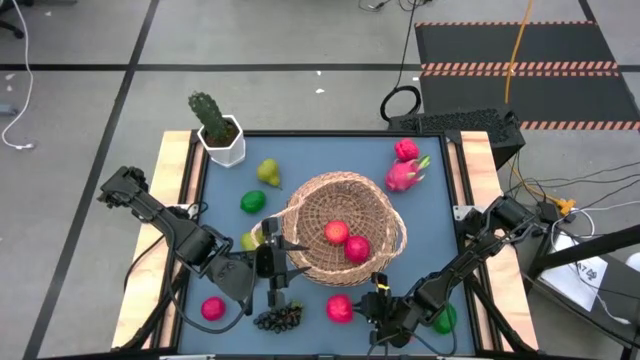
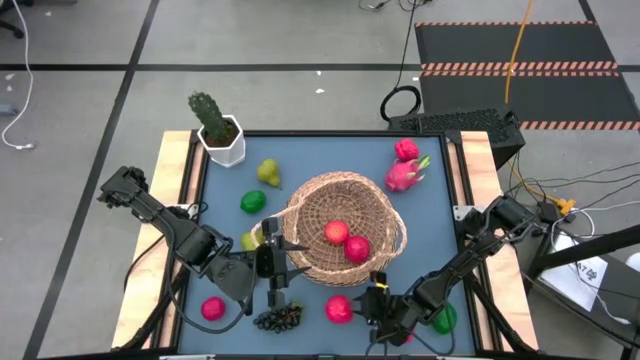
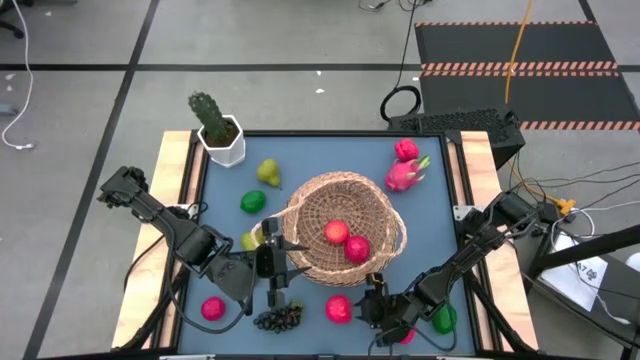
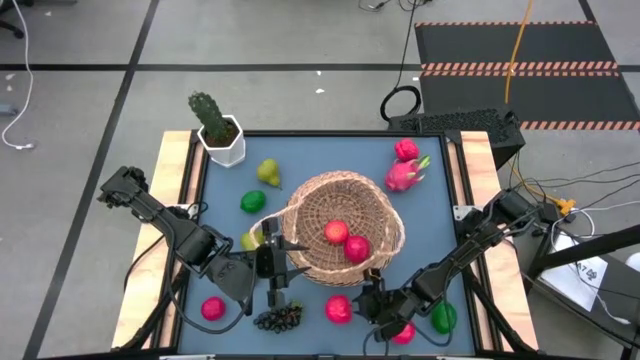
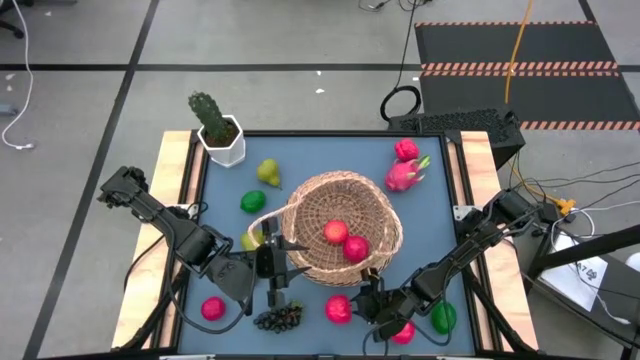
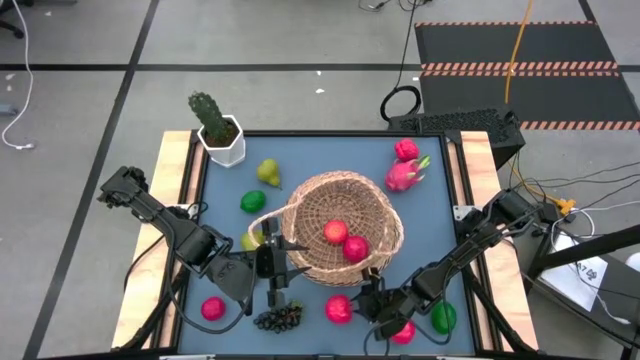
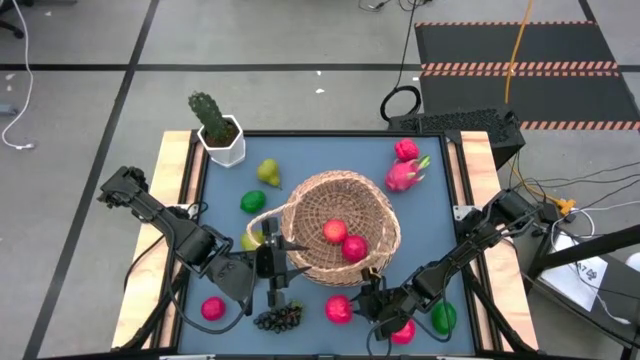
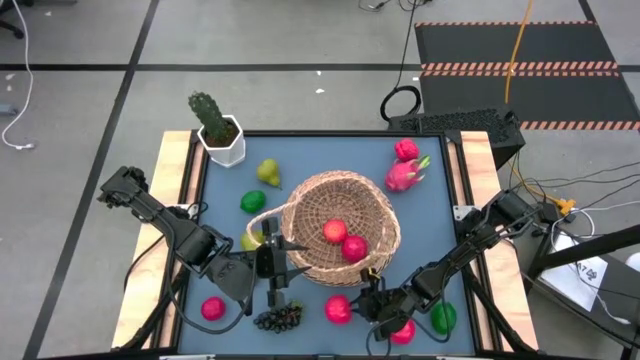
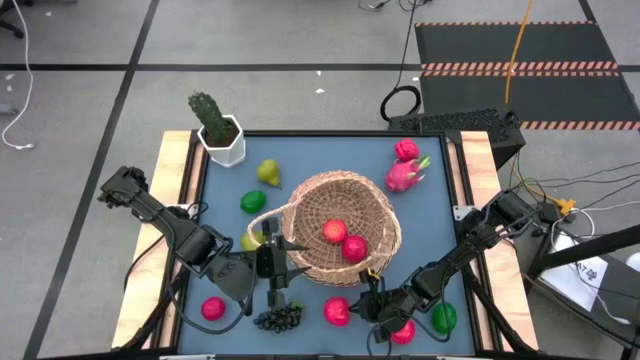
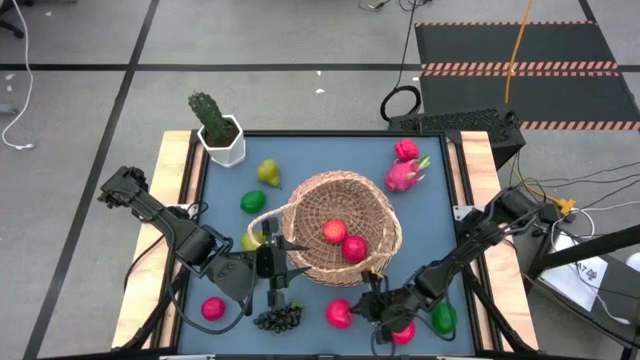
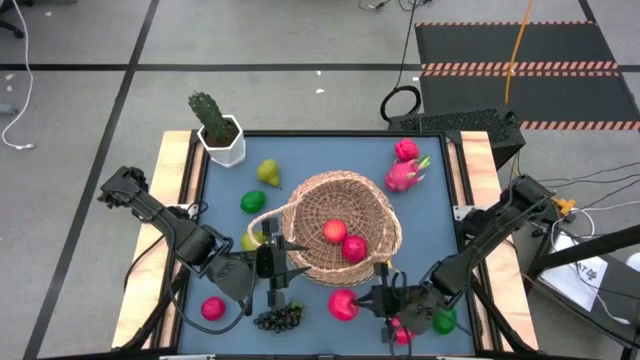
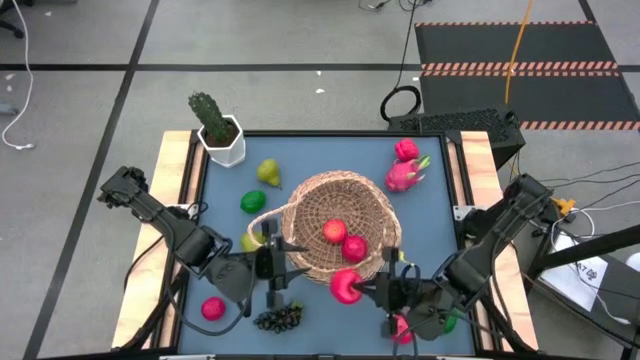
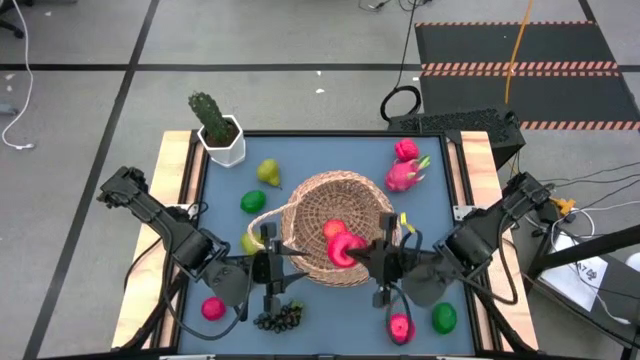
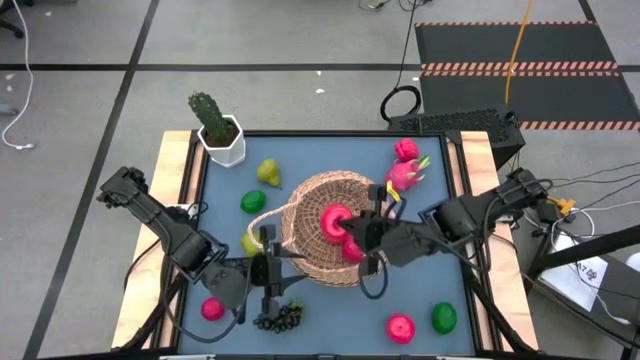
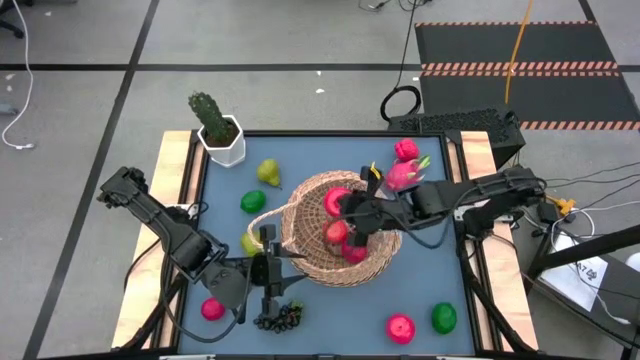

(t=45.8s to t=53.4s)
Task: Build produce basket
Put the middle red apple into the brown basket

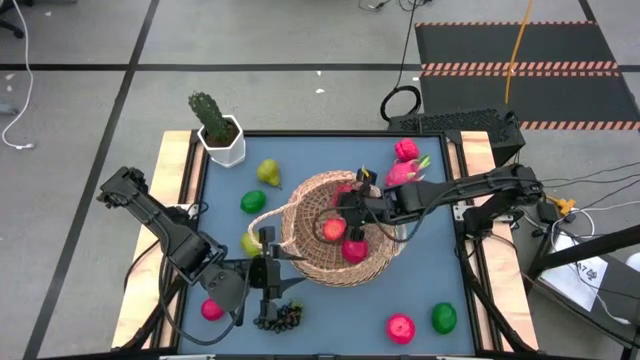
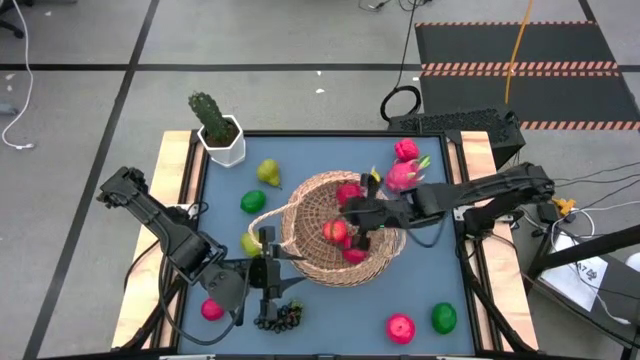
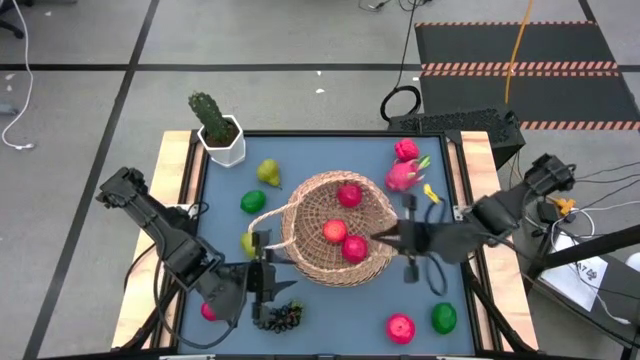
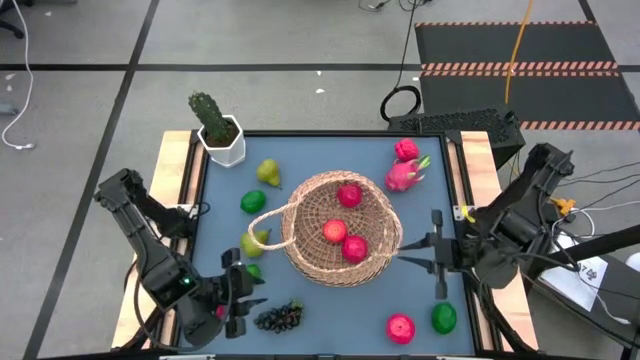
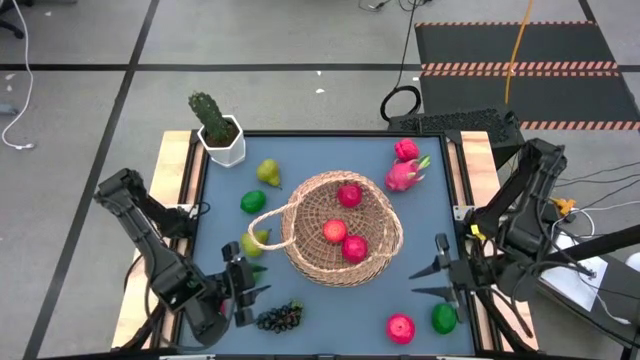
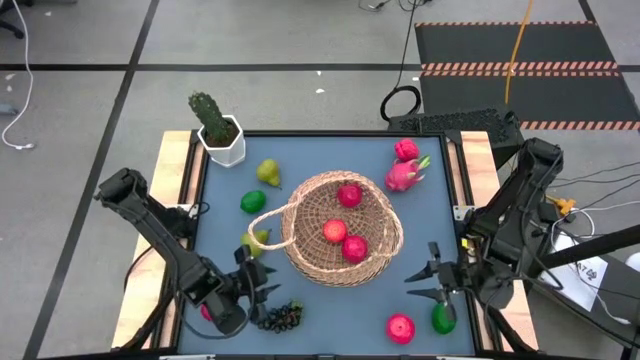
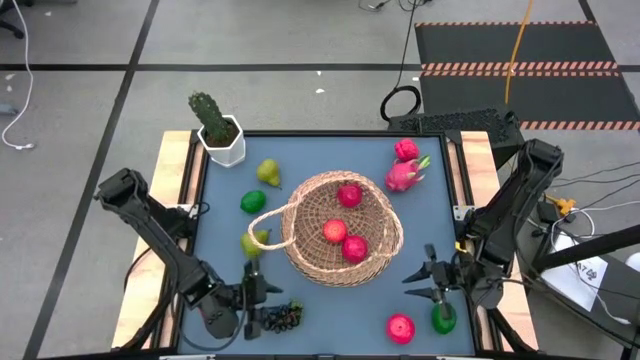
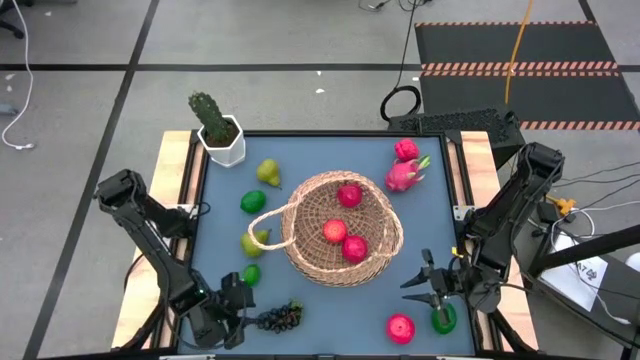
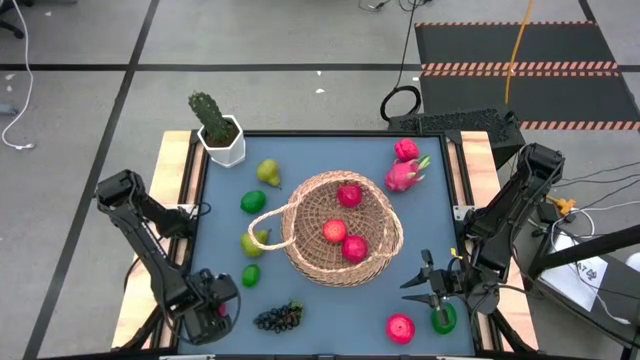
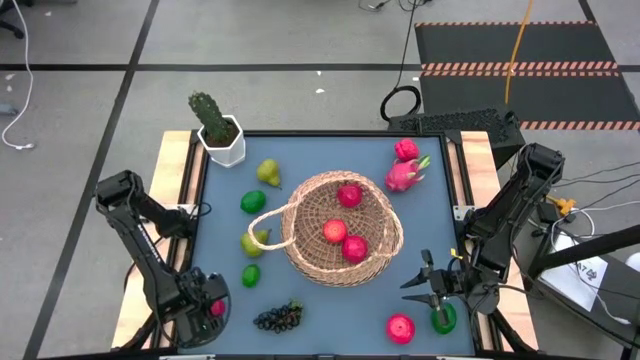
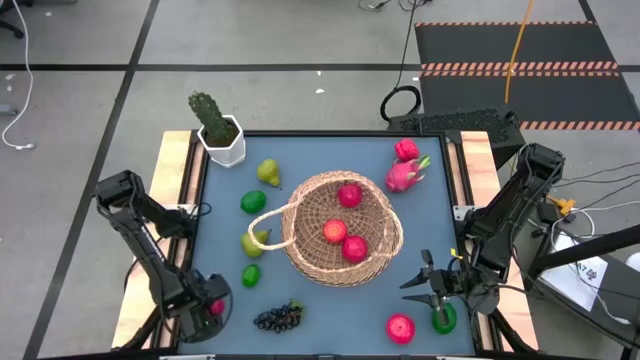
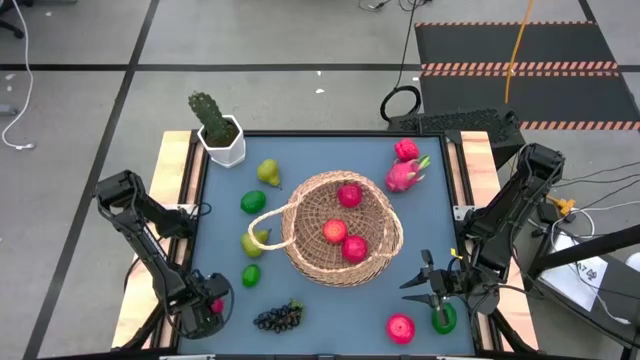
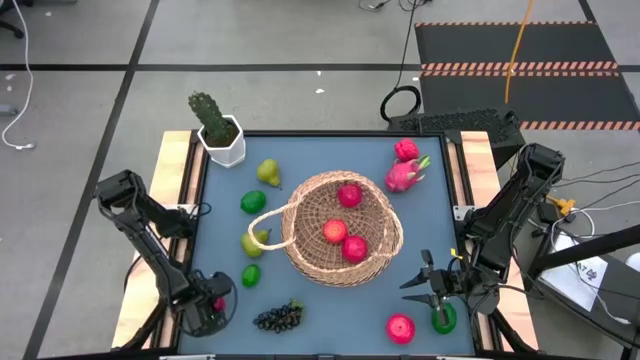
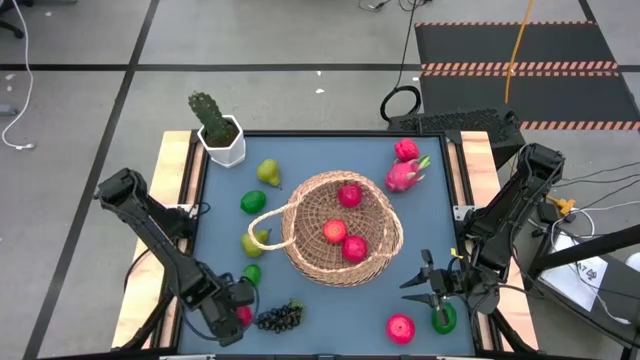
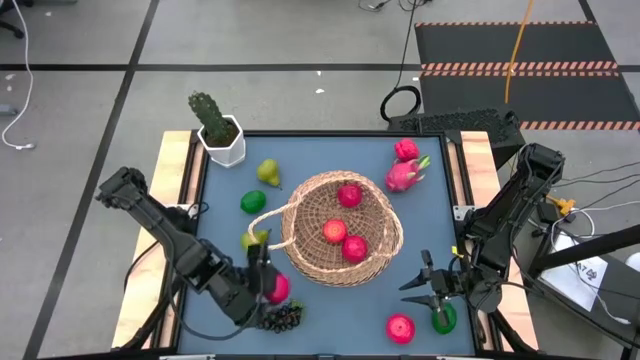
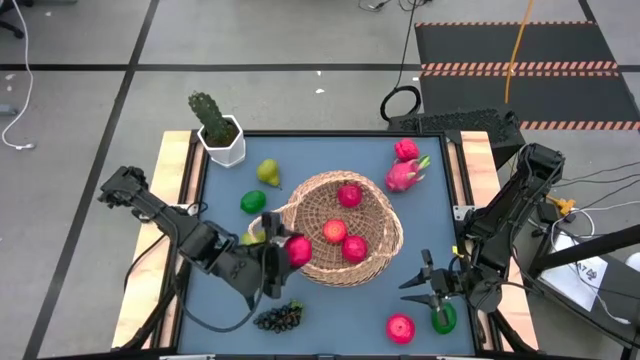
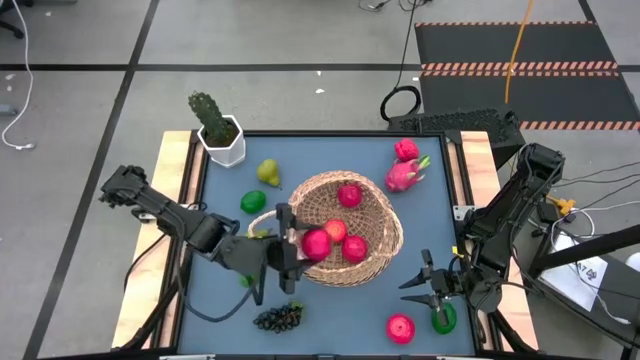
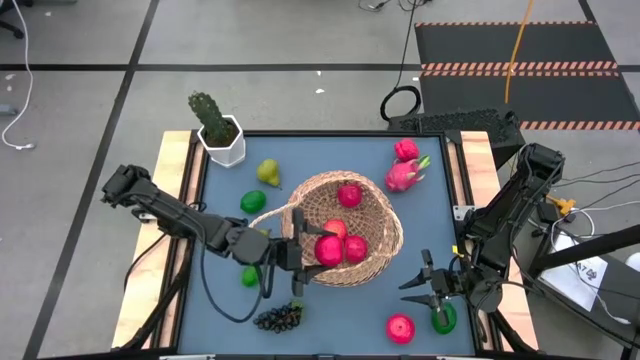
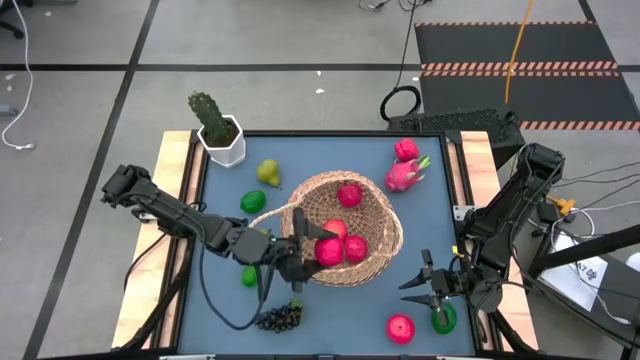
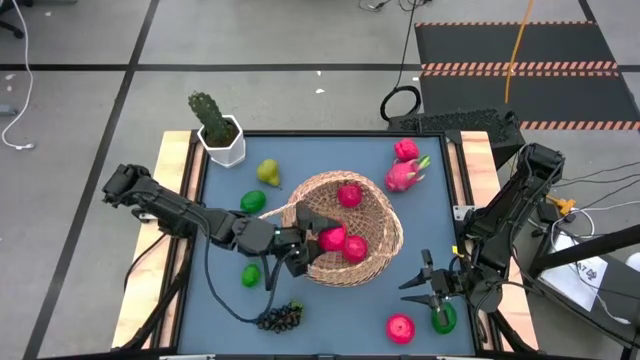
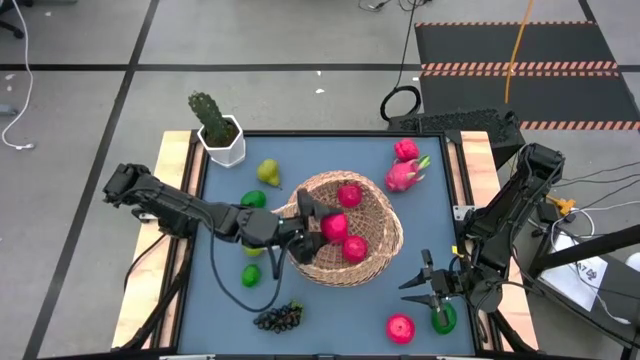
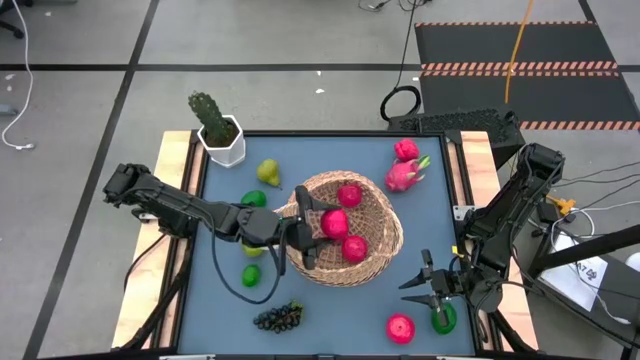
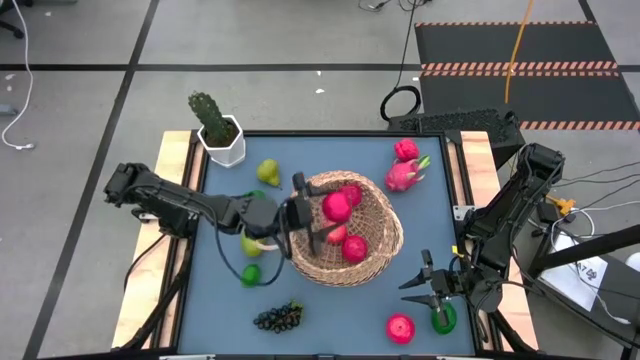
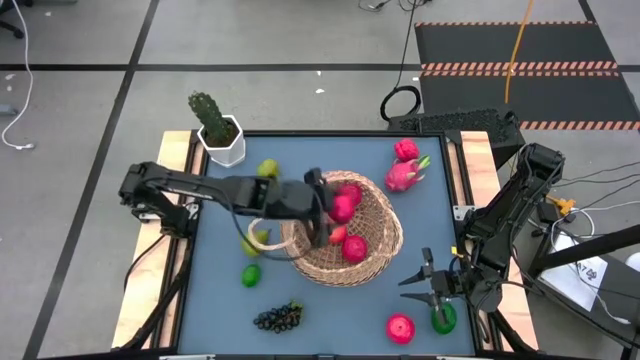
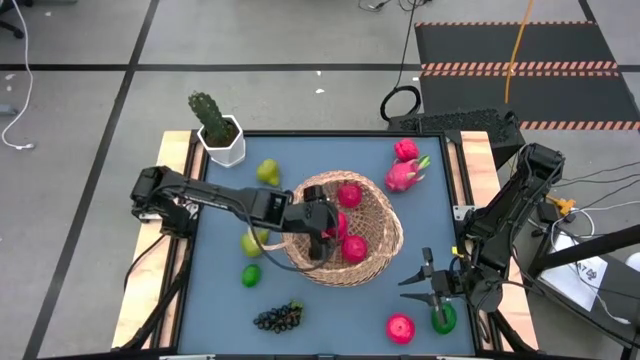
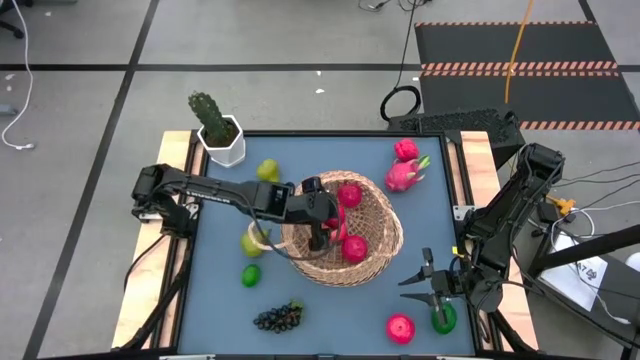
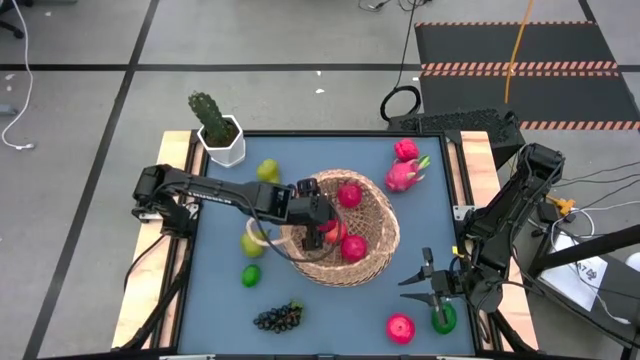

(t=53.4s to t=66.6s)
Put the left red apple into the brown basket
